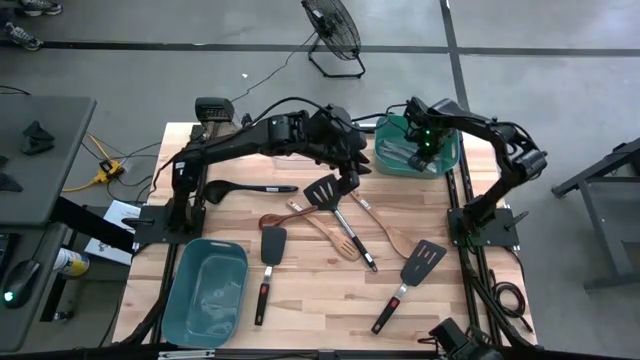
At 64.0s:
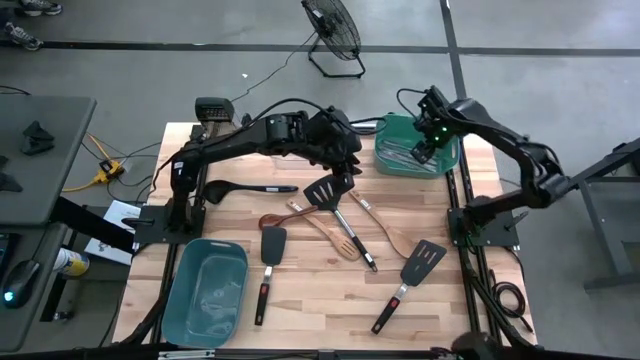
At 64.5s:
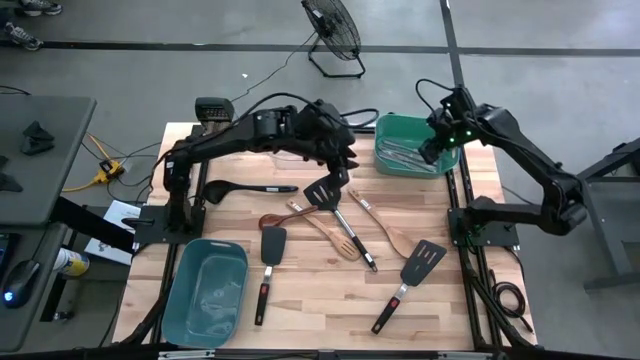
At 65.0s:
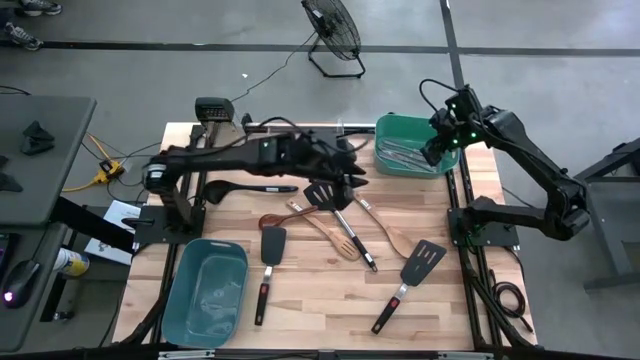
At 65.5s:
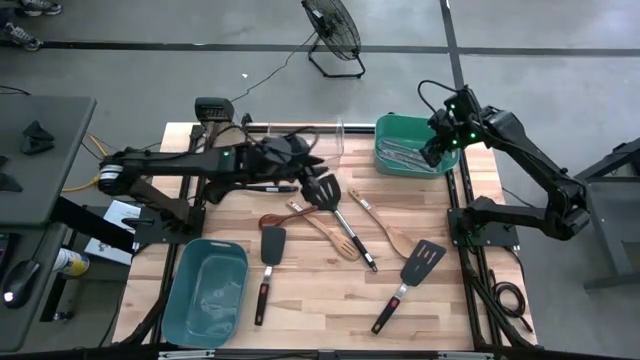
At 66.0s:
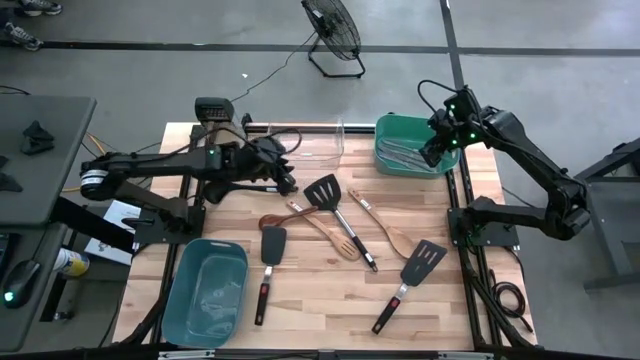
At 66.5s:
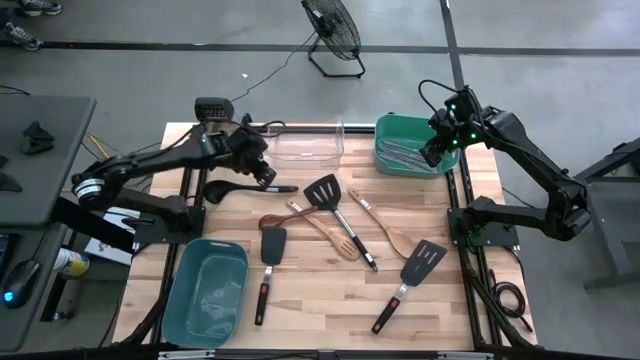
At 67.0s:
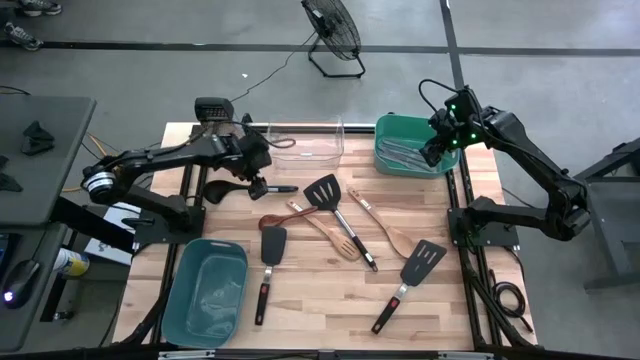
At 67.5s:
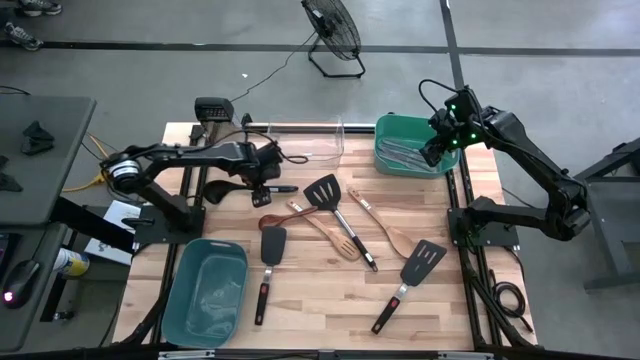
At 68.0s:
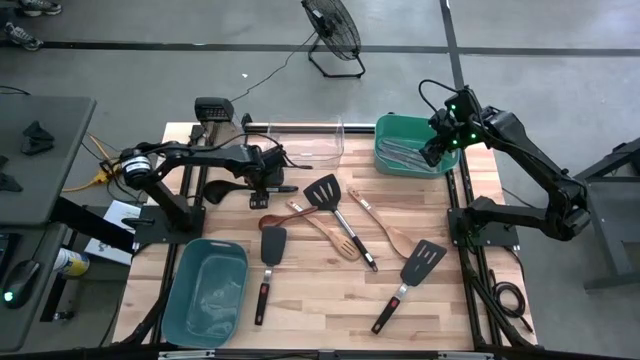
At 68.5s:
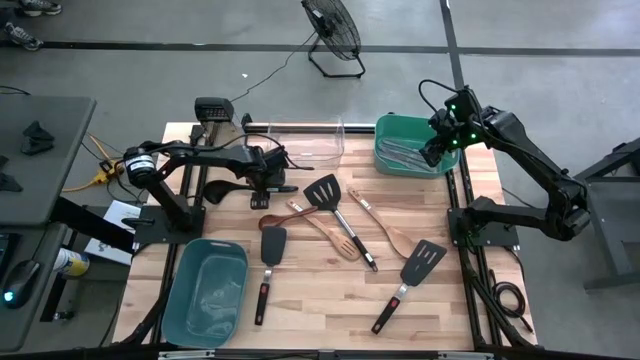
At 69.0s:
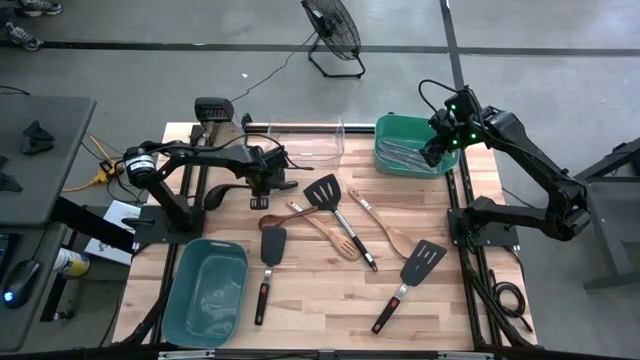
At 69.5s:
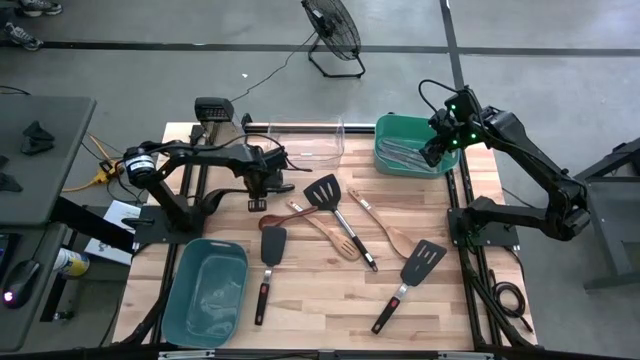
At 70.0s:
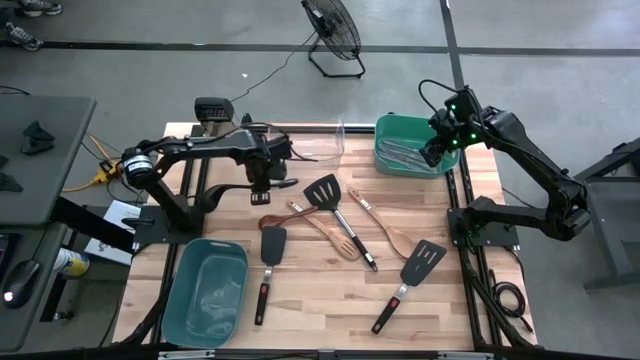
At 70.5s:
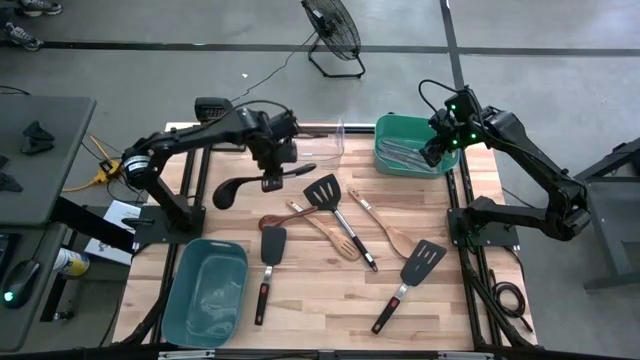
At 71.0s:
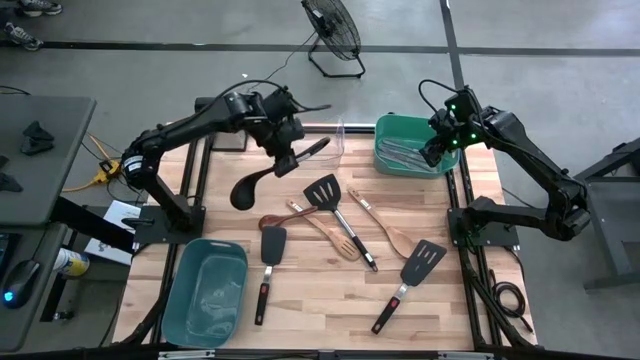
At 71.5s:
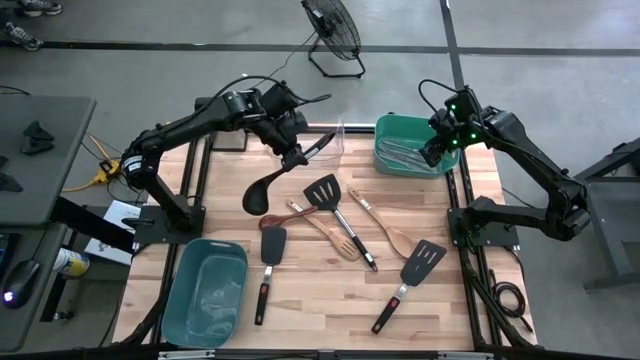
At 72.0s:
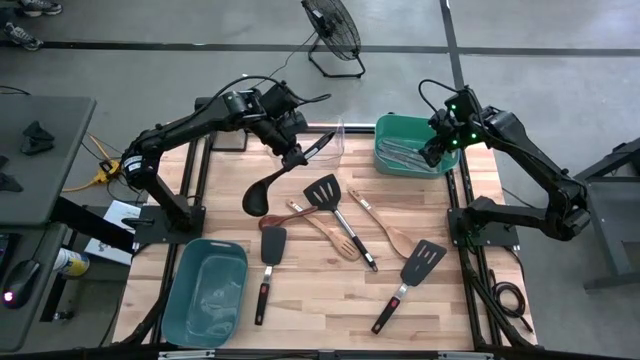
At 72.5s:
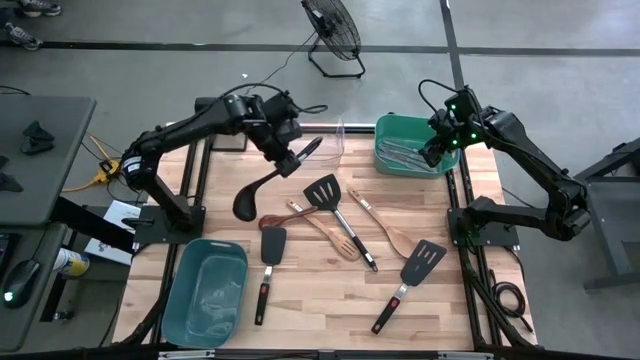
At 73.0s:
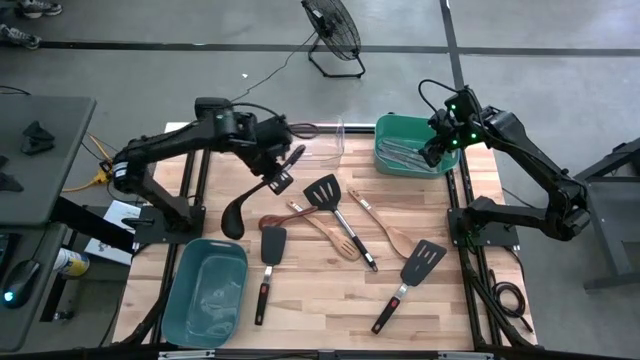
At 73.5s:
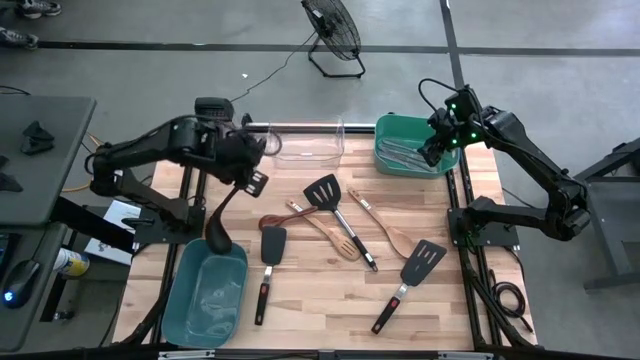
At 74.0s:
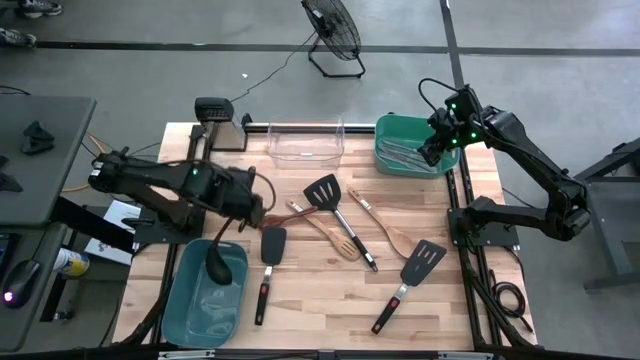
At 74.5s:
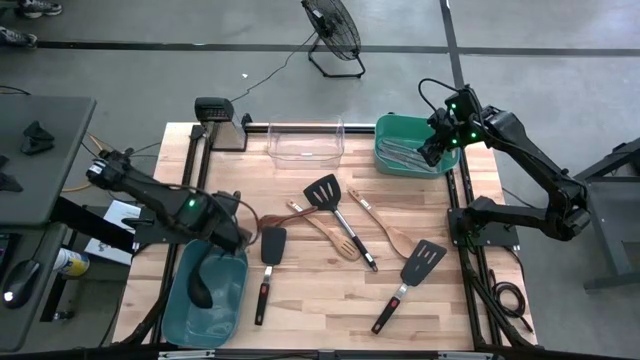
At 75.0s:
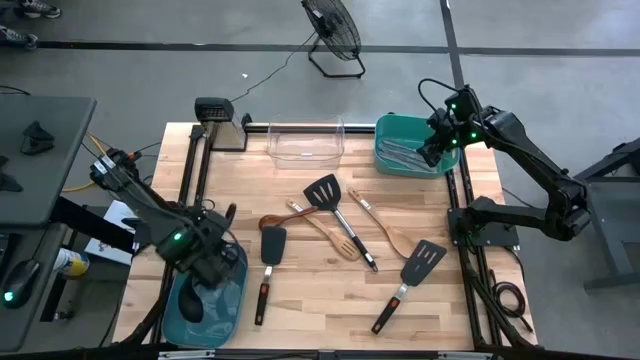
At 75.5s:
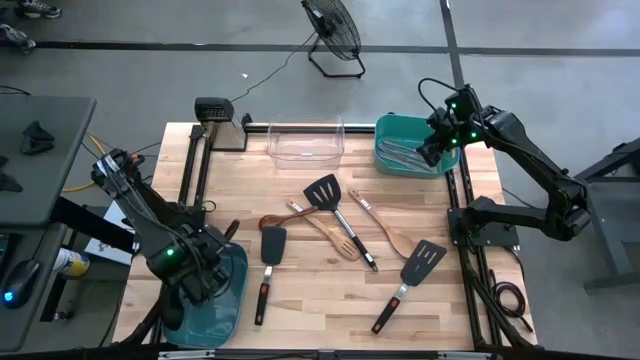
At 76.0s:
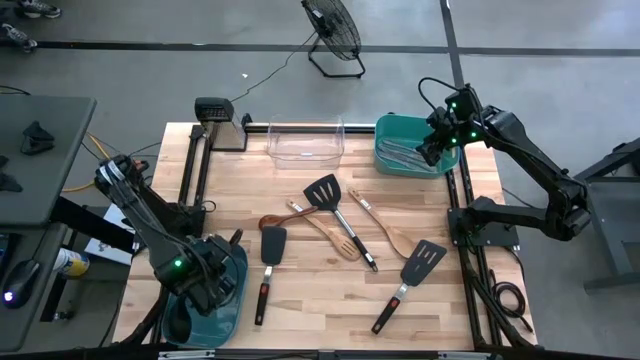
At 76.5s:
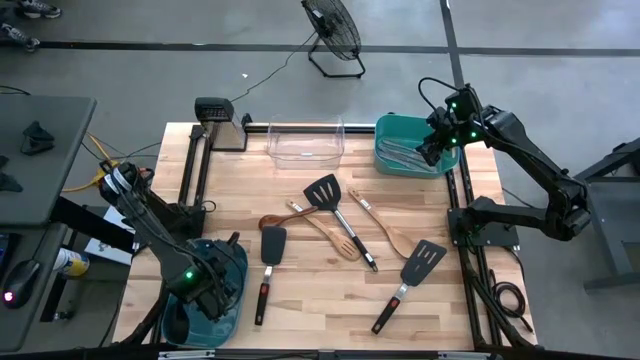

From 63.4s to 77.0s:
Task: Pick & Place Kitchen Items
Put the black ladle into the blue bin

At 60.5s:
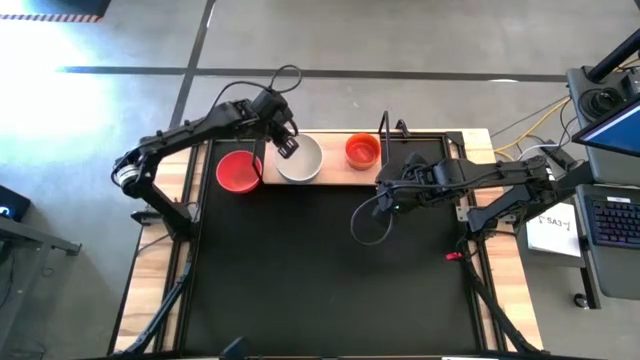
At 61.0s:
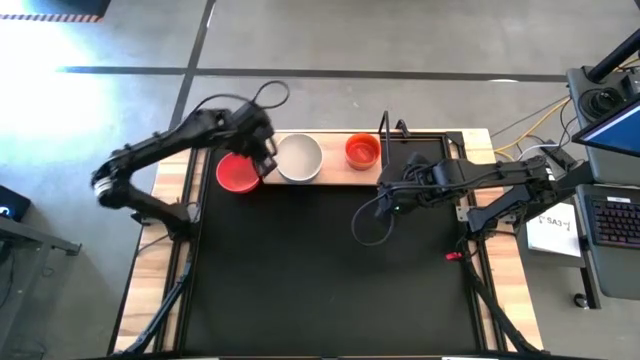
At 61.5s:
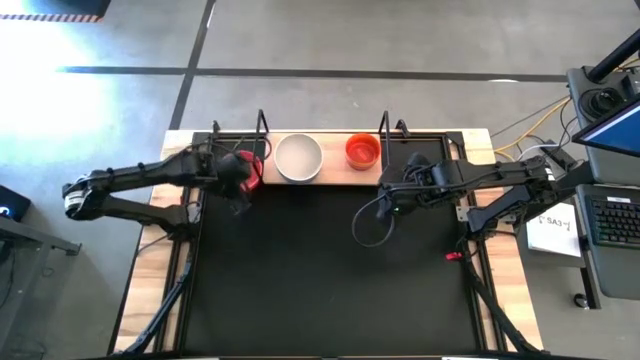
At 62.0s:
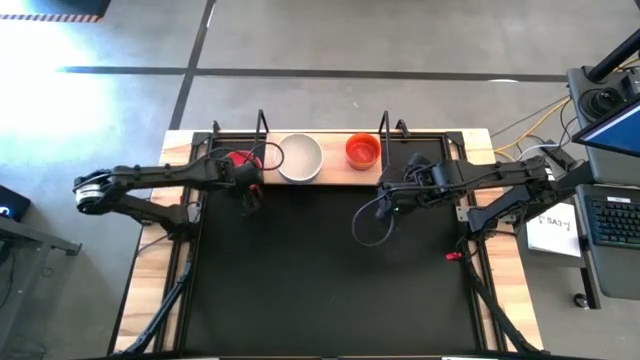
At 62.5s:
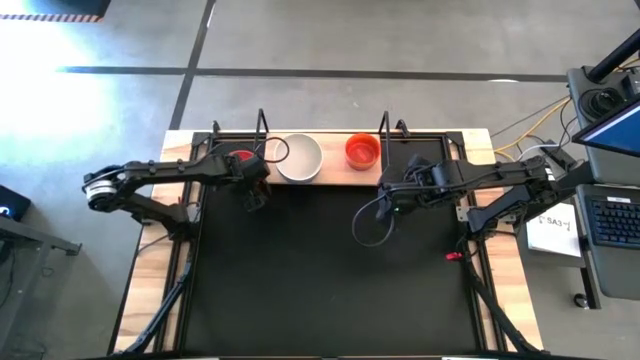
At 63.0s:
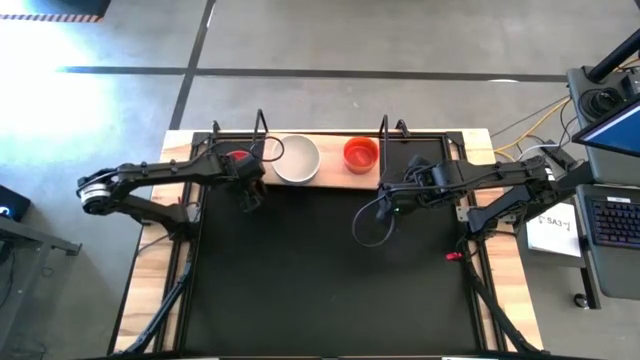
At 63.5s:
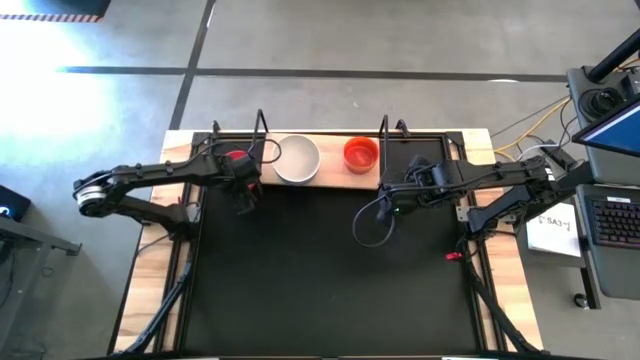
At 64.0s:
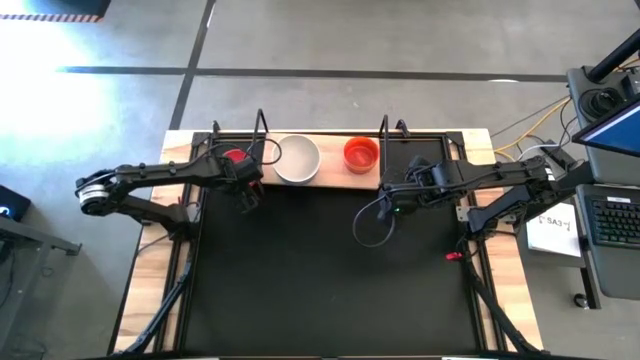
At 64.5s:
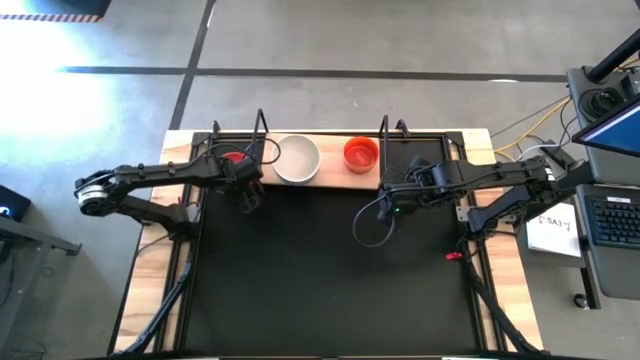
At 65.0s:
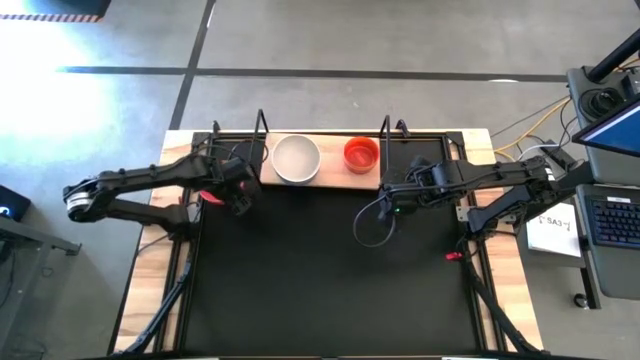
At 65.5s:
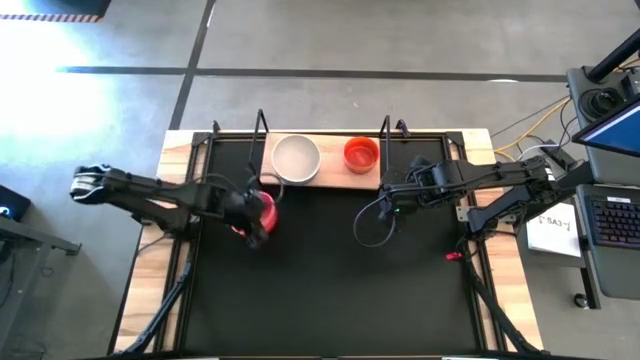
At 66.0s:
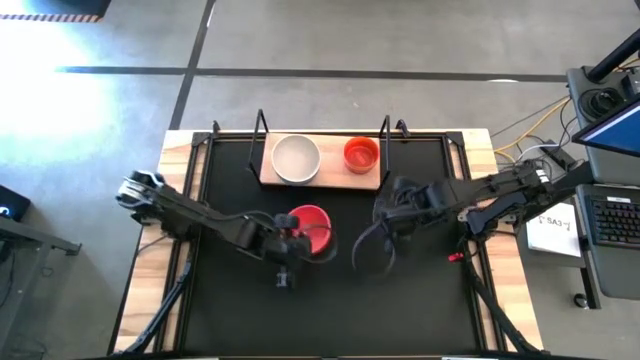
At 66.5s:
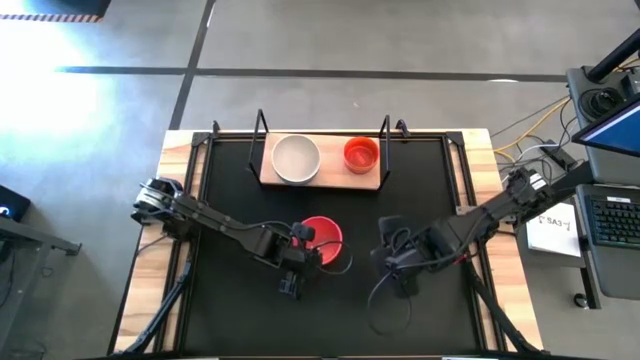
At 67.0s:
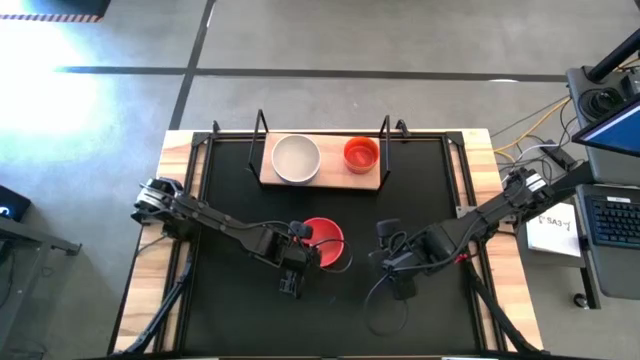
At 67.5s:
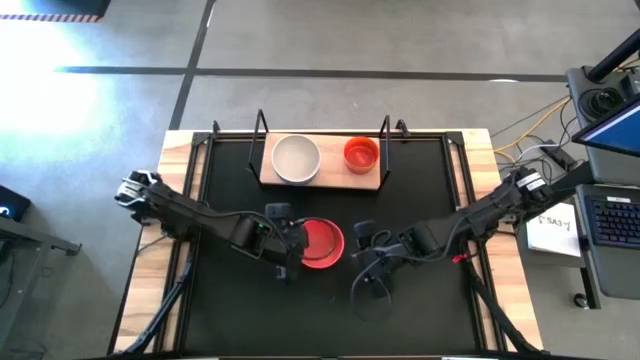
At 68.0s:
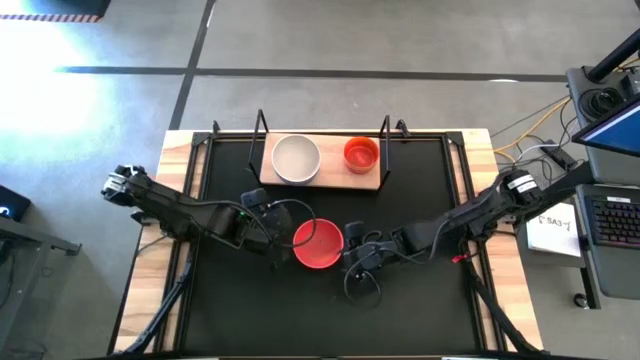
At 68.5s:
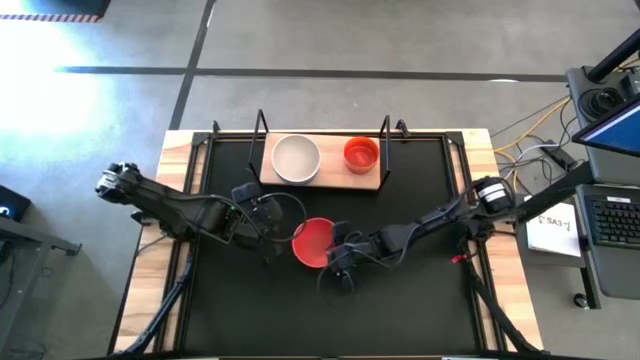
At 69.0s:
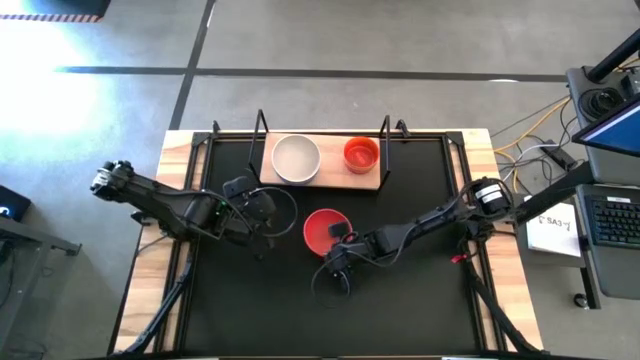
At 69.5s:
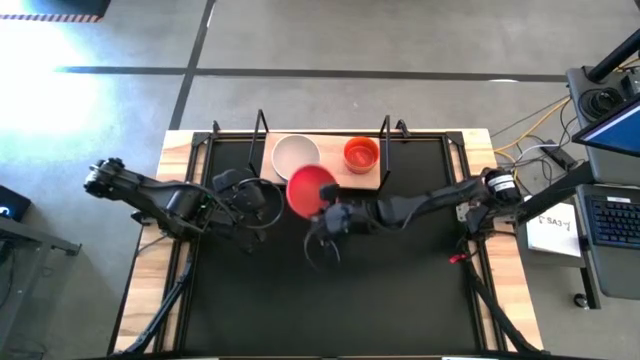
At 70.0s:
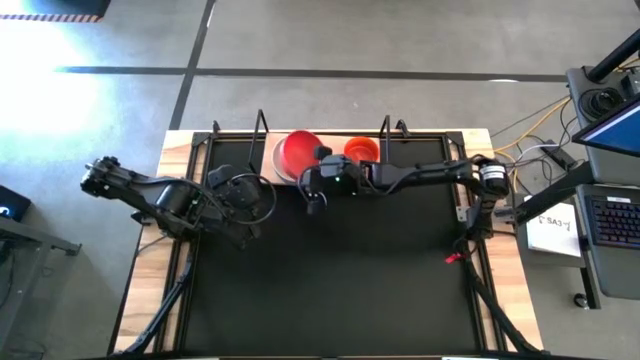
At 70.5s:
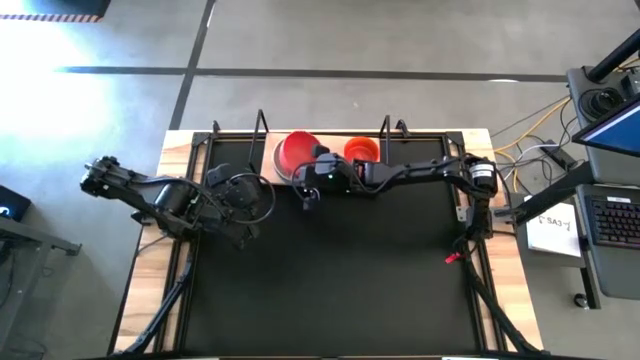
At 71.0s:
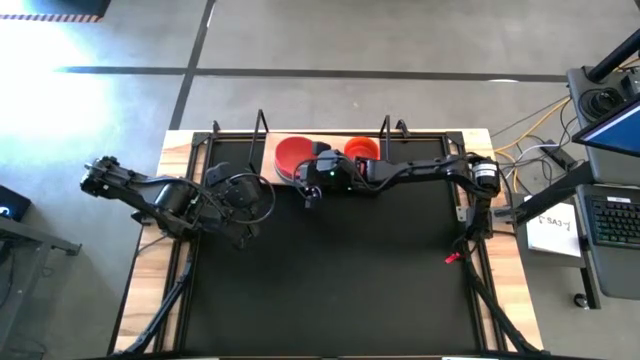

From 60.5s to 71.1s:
Task: Place and stack bowls onto a shelf
Stack the orange bowl on top of the white bowl on the shelf
